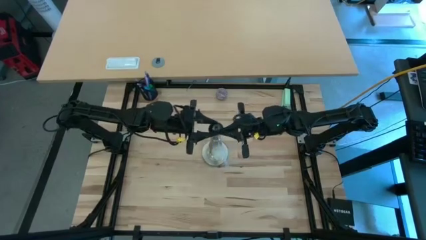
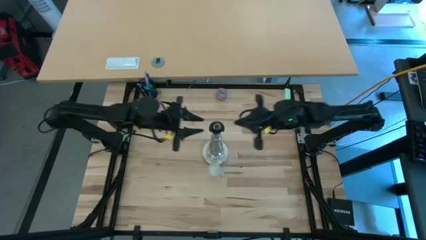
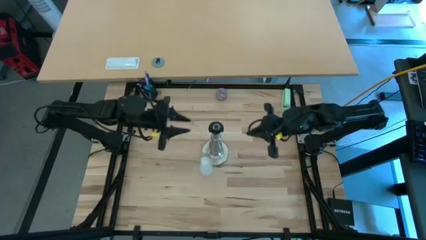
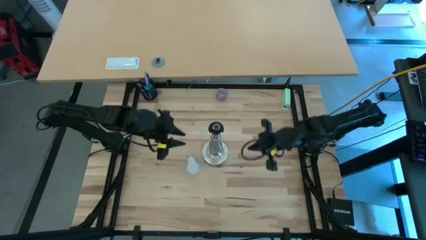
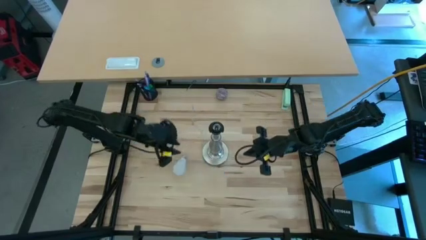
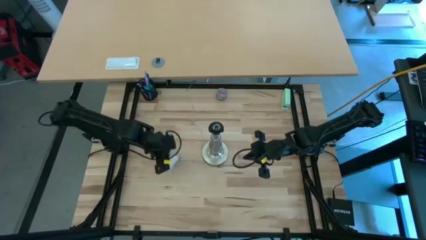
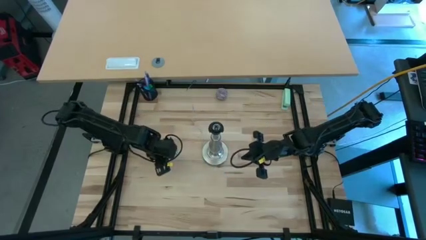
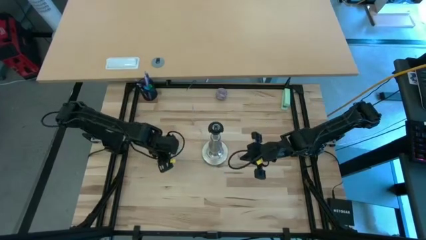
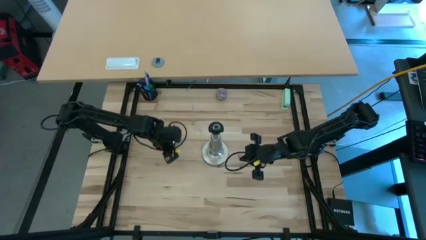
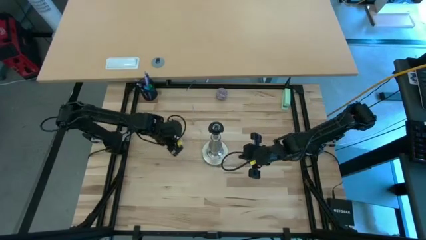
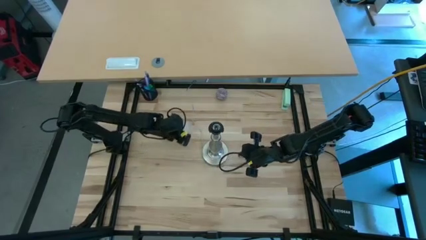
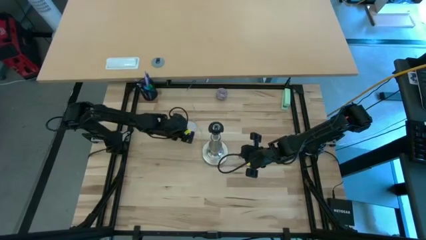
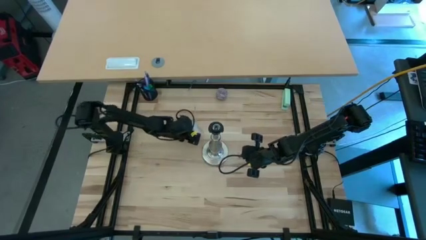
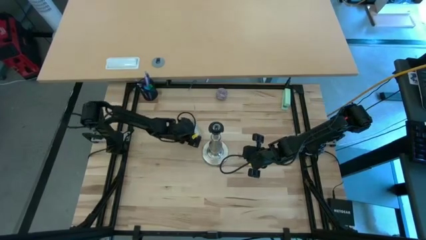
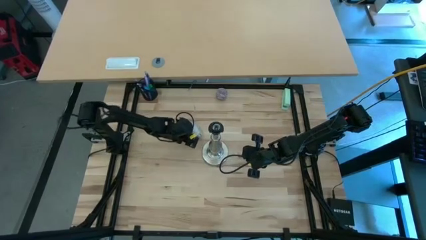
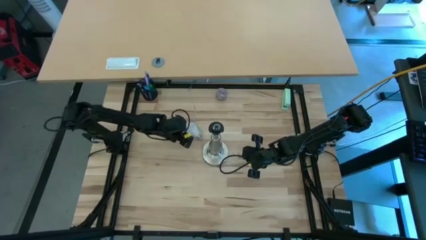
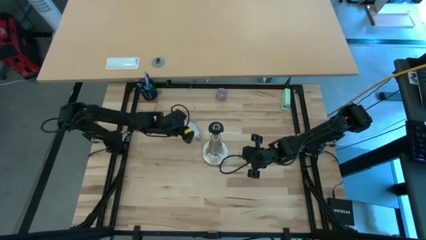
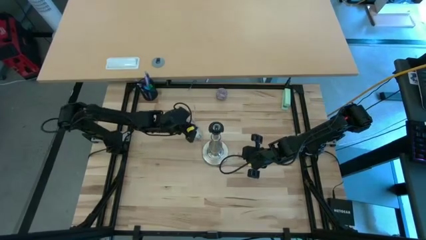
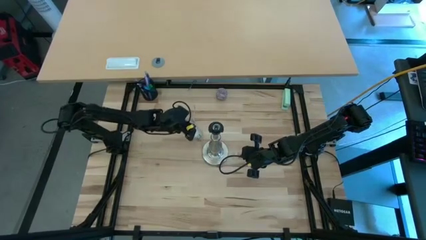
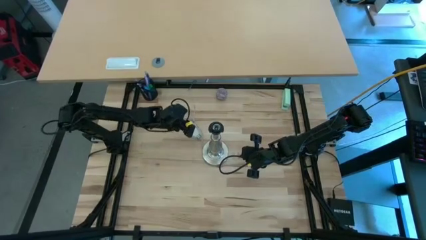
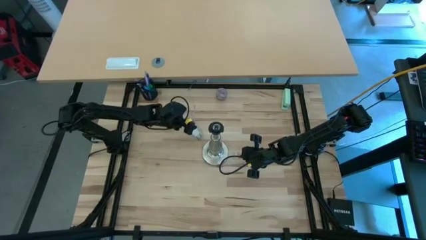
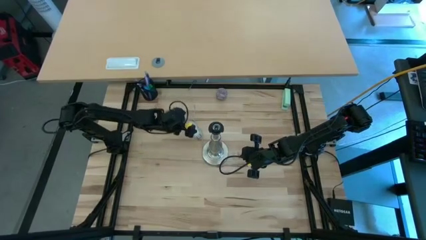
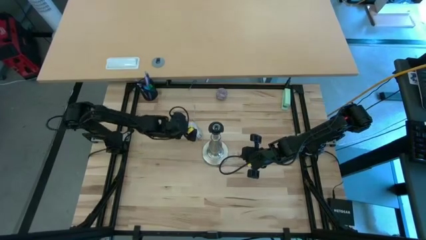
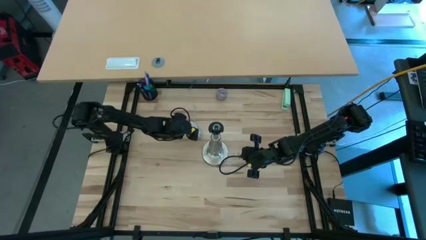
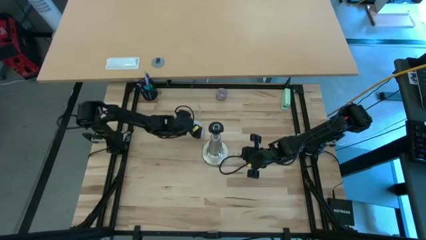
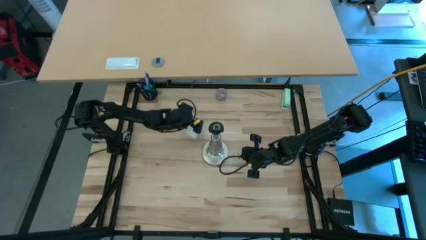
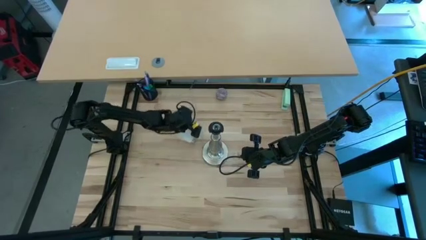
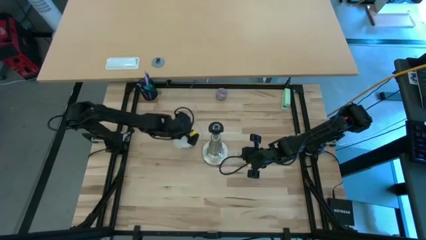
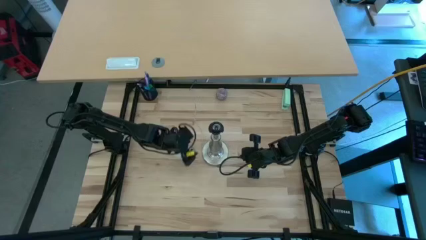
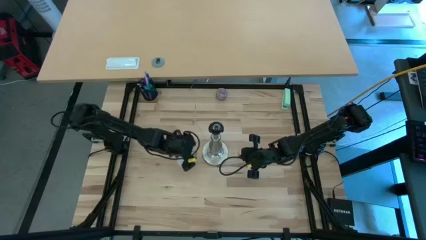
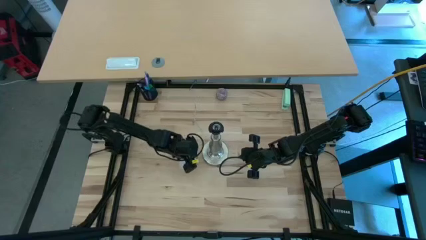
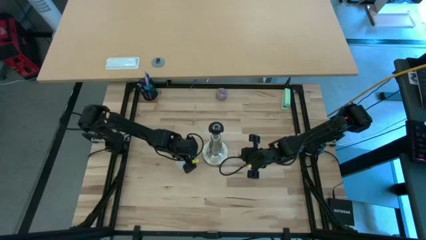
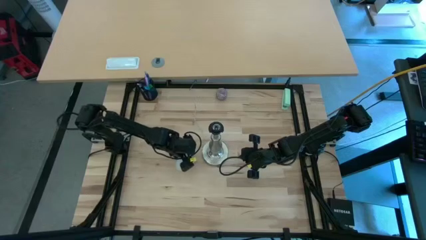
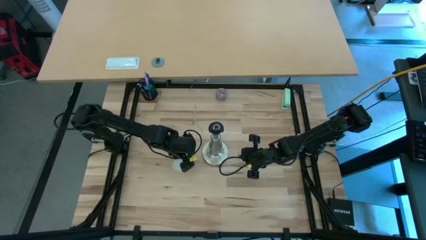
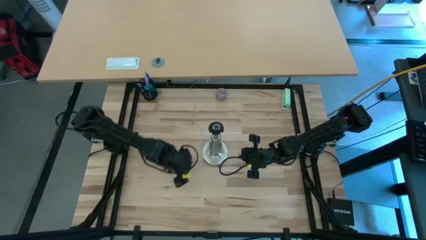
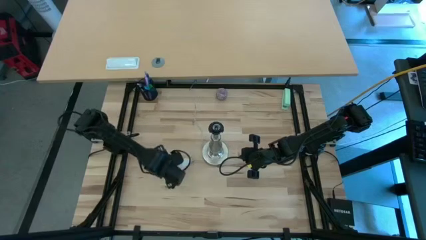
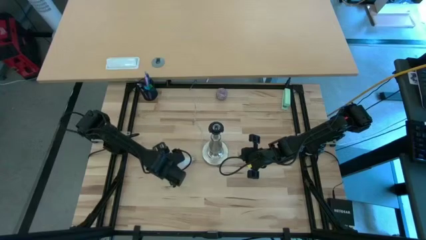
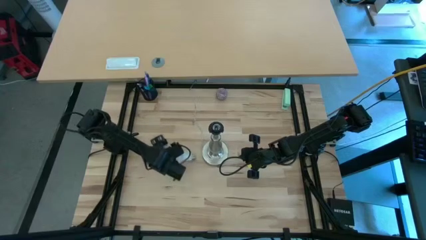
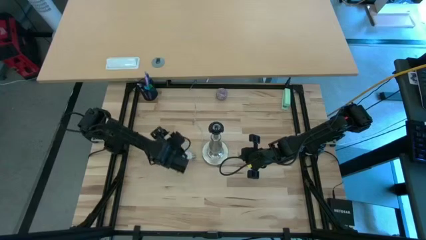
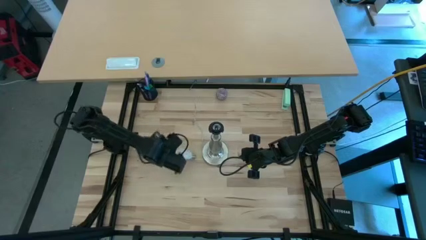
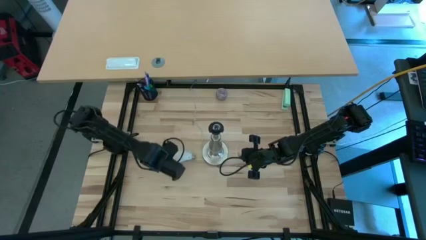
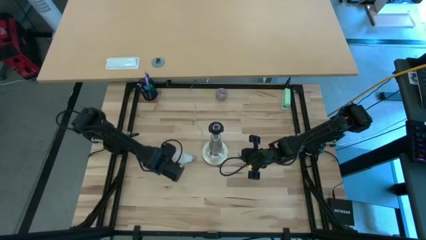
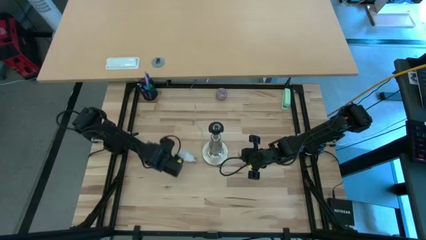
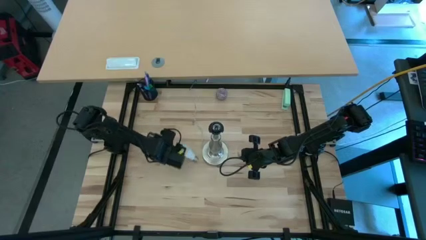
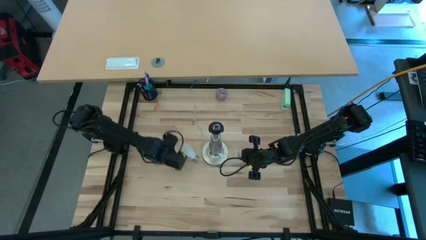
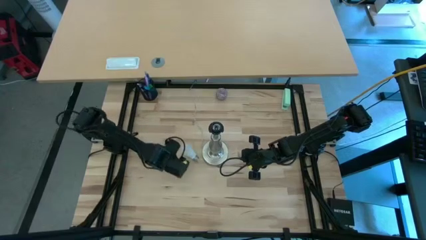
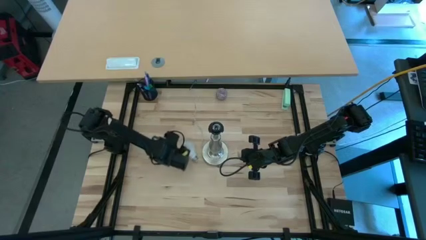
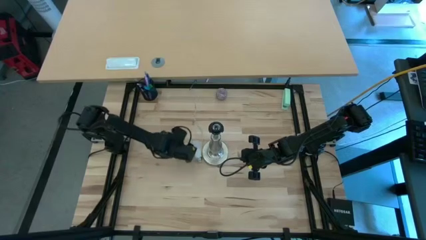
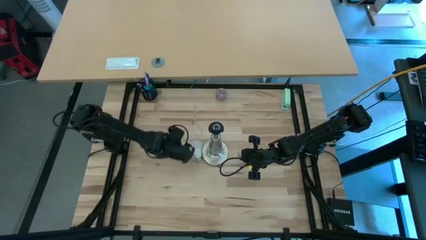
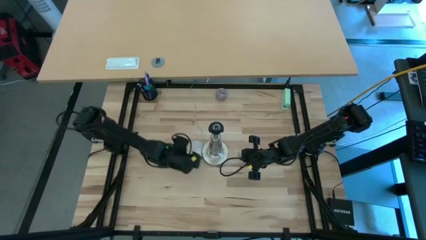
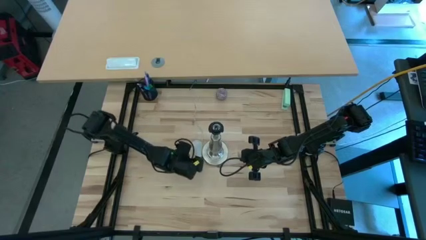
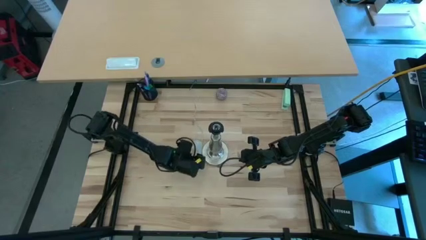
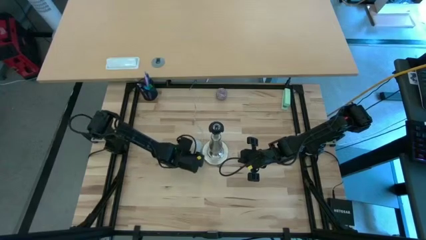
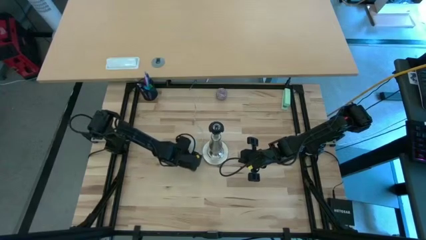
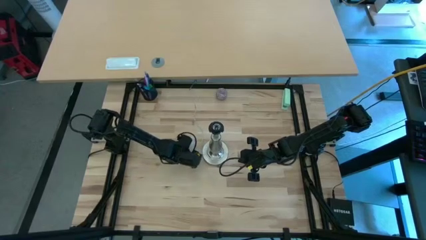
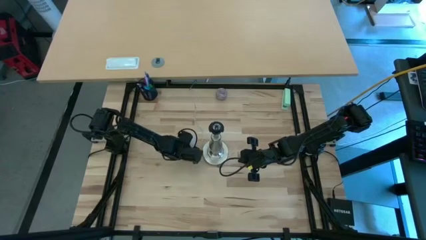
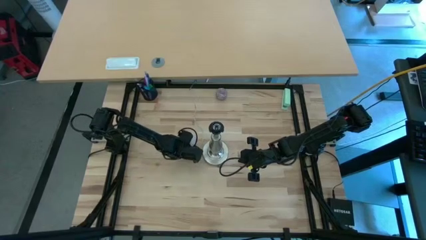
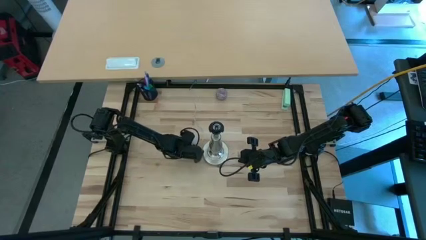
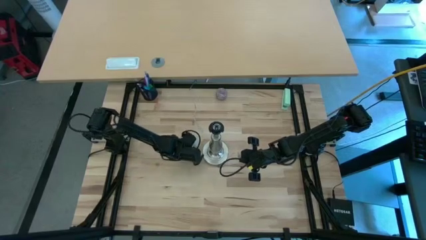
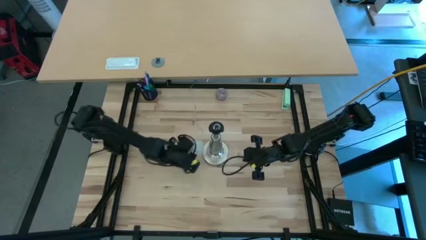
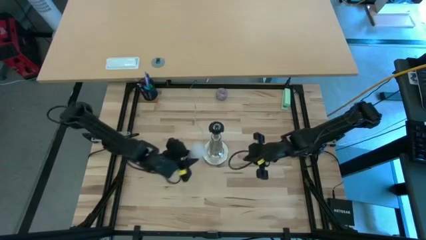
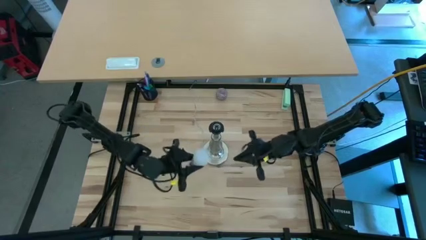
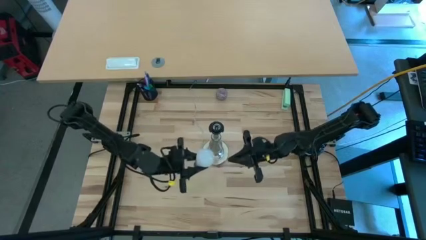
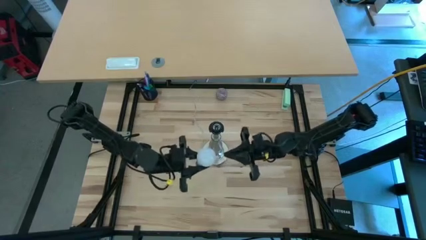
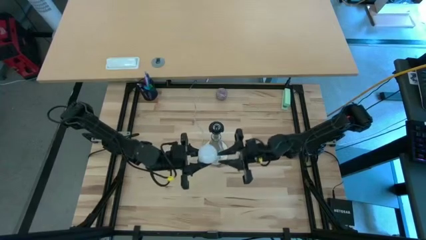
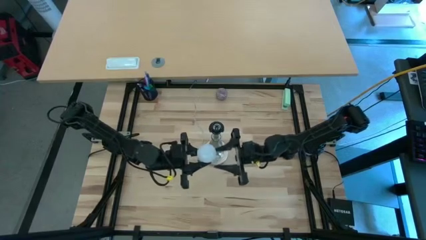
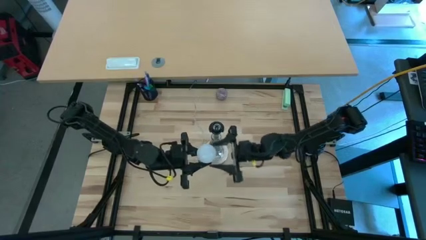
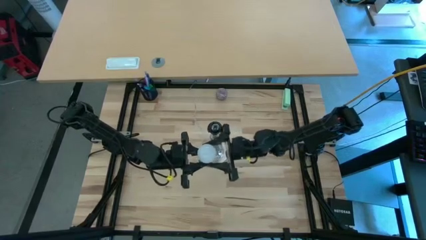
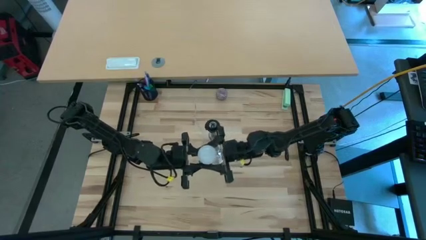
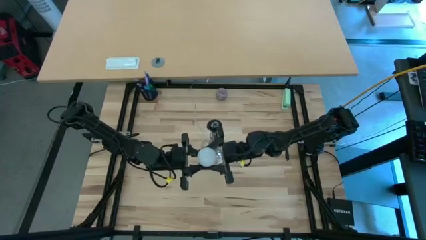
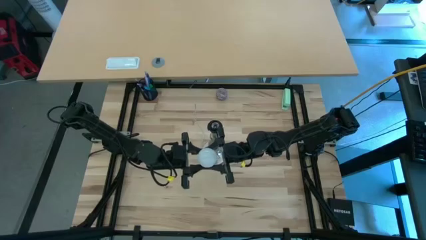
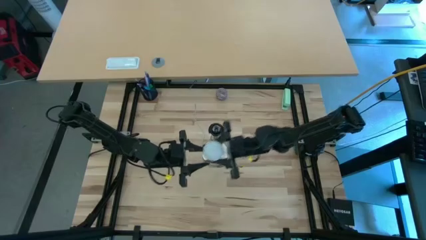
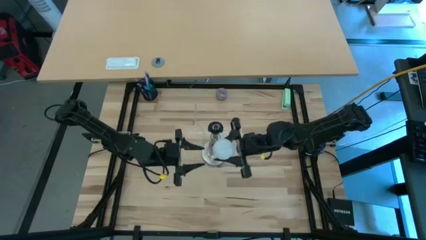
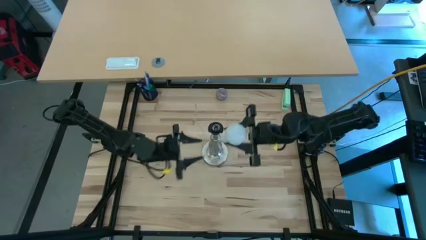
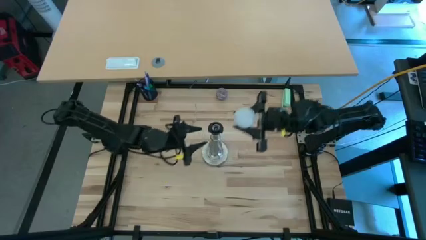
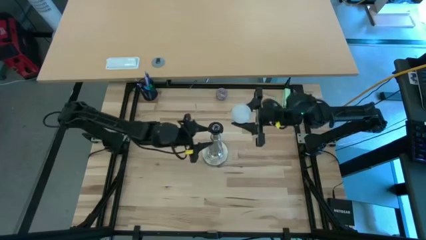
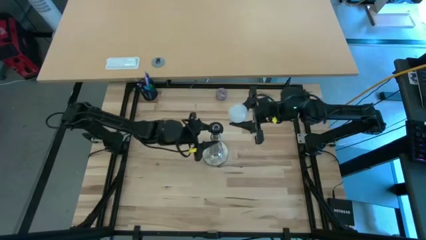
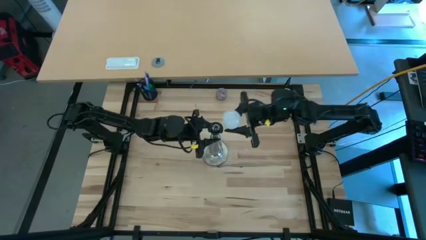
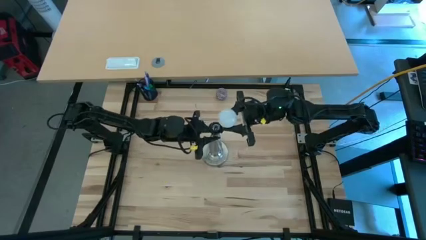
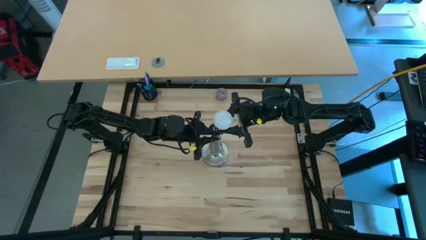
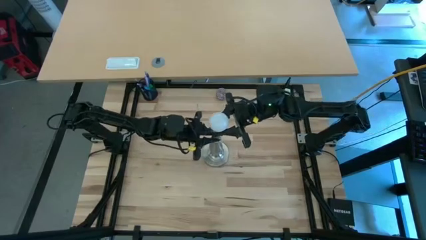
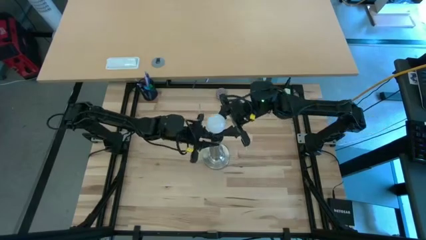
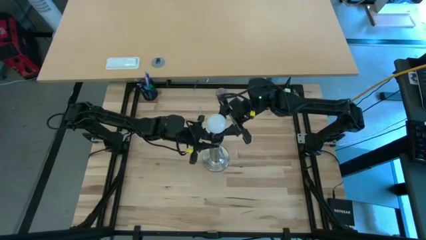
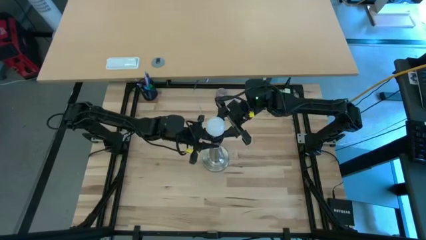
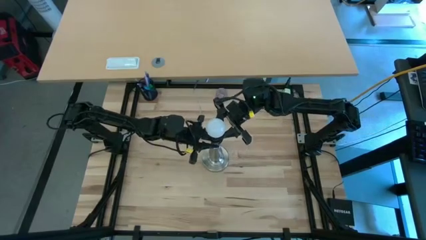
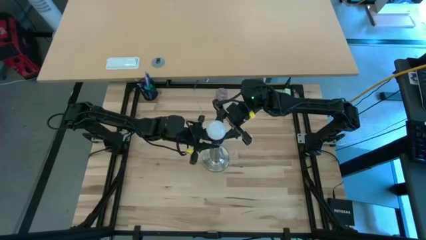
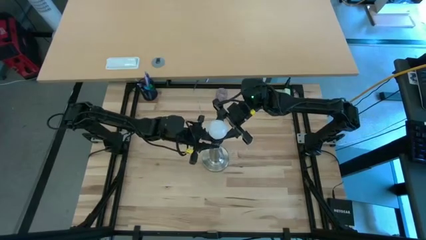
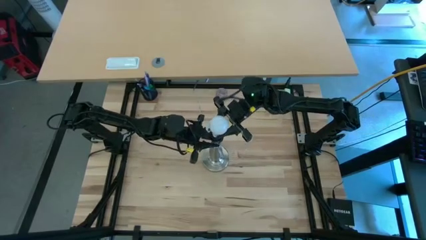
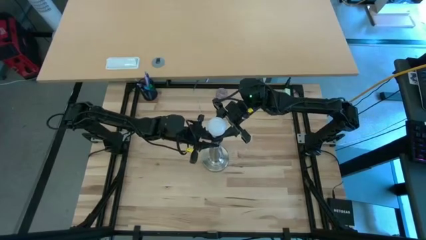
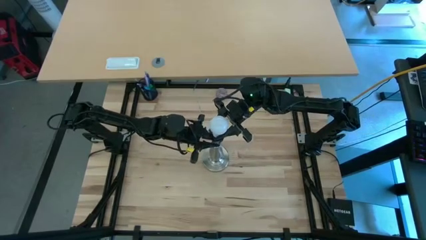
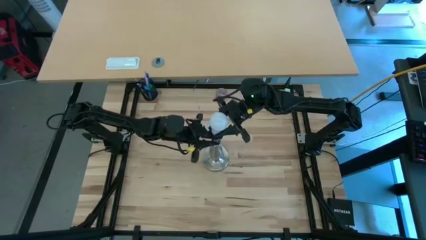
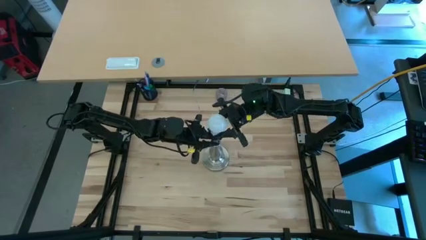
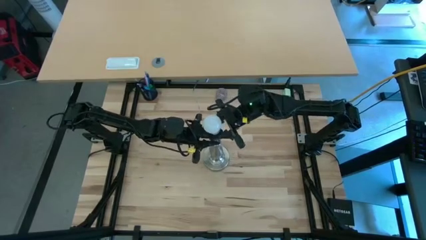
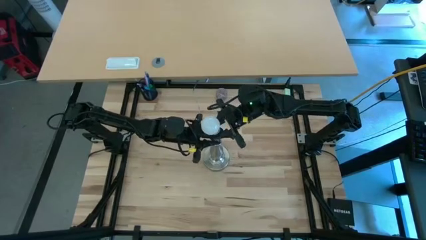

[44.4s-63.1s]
Task: Screw lightbulb
Insert the lightbulb into the silver lamp
